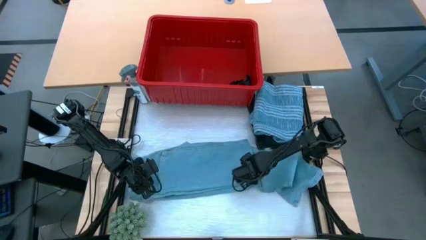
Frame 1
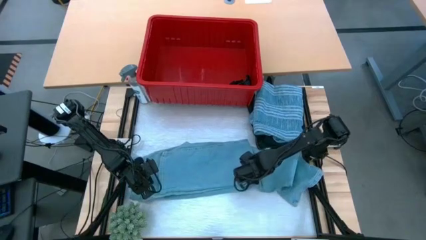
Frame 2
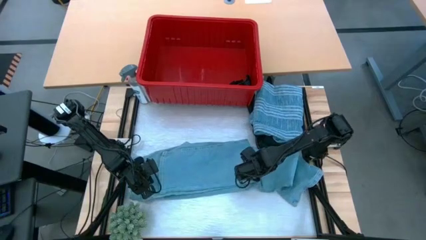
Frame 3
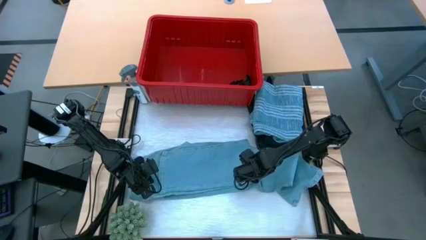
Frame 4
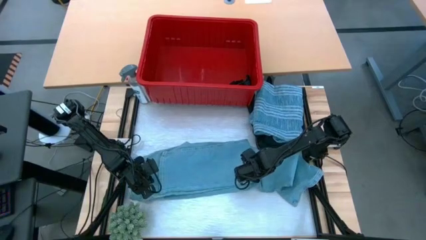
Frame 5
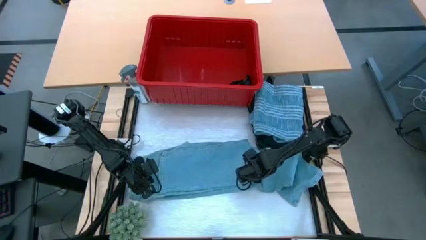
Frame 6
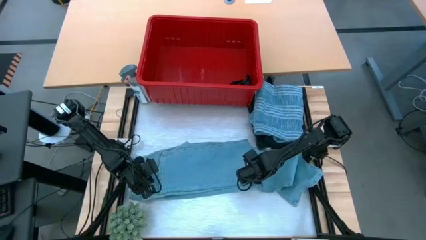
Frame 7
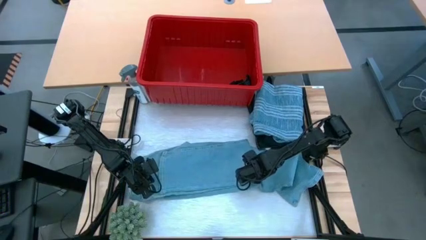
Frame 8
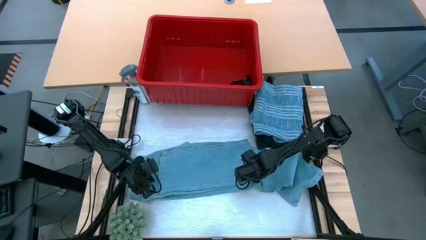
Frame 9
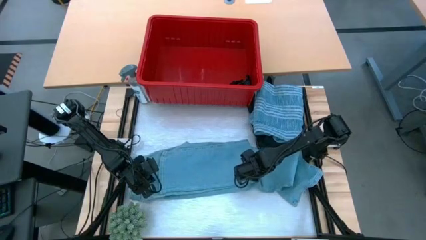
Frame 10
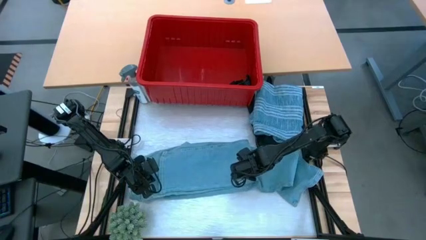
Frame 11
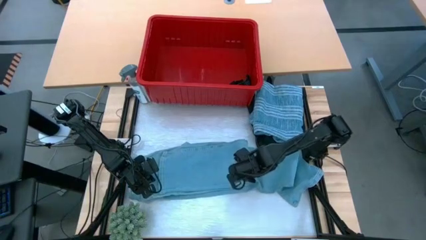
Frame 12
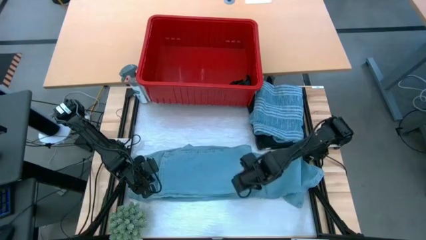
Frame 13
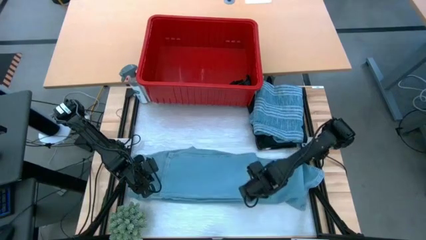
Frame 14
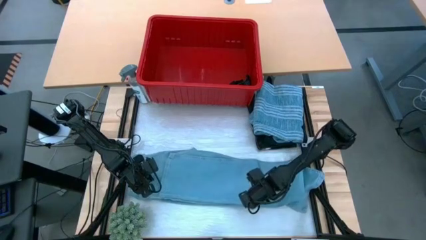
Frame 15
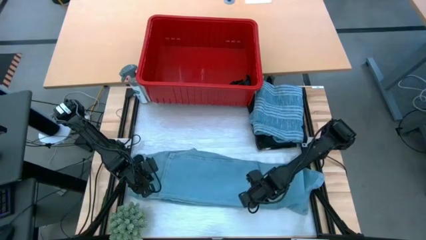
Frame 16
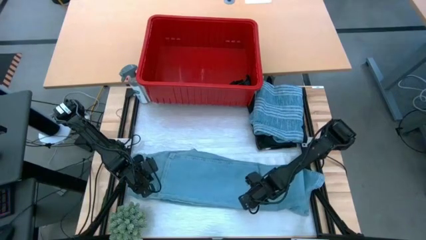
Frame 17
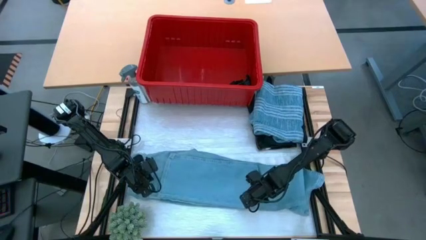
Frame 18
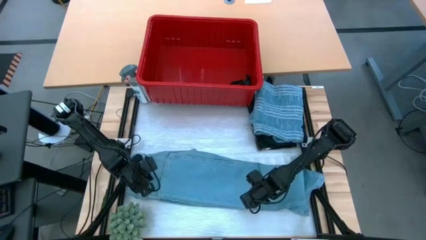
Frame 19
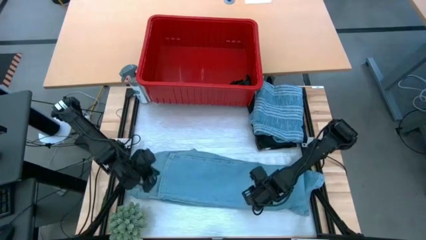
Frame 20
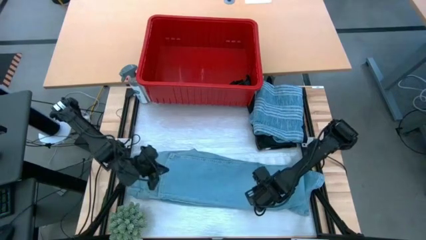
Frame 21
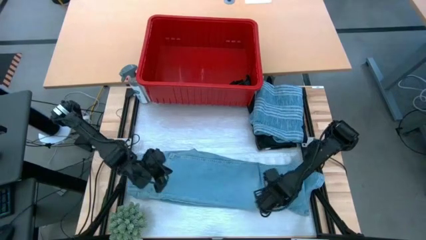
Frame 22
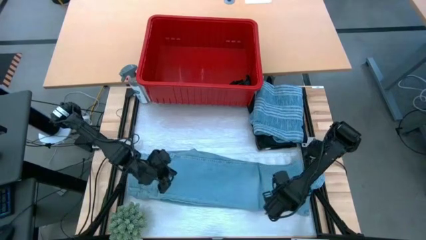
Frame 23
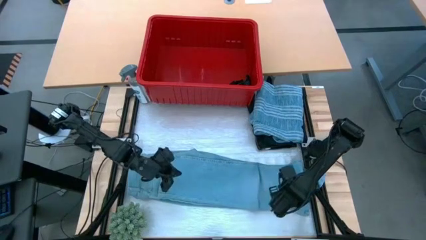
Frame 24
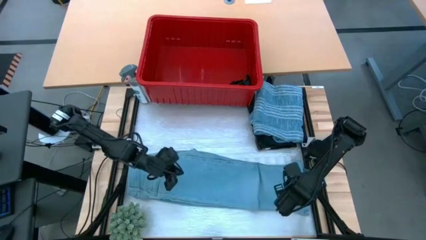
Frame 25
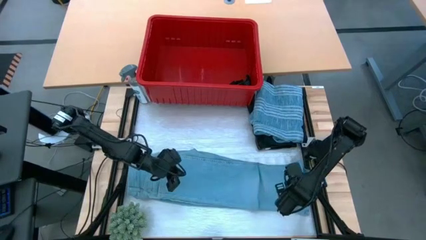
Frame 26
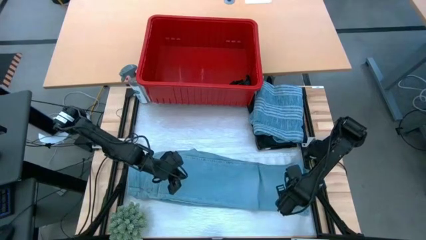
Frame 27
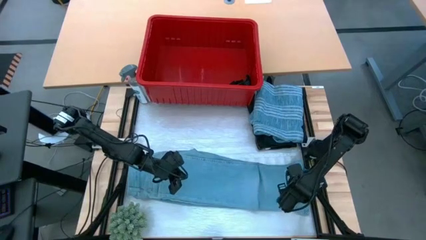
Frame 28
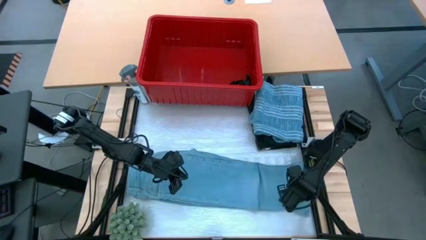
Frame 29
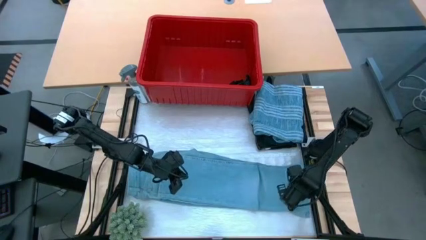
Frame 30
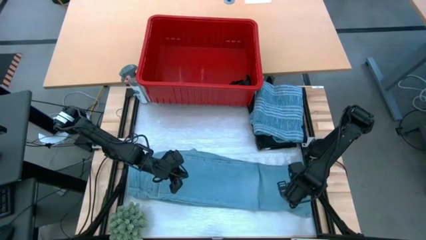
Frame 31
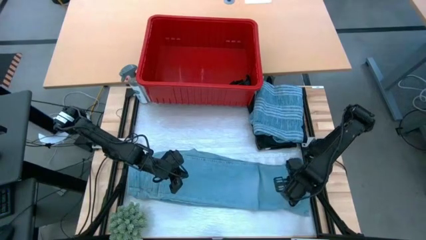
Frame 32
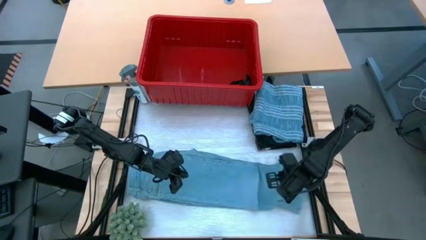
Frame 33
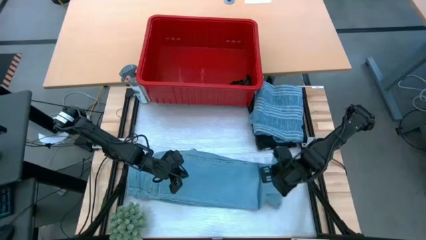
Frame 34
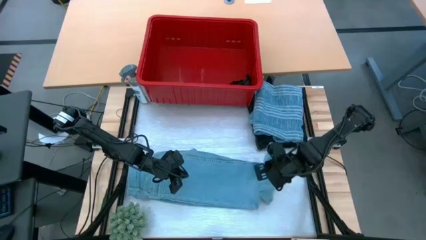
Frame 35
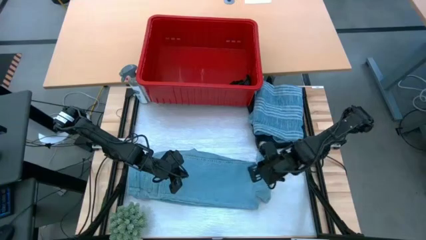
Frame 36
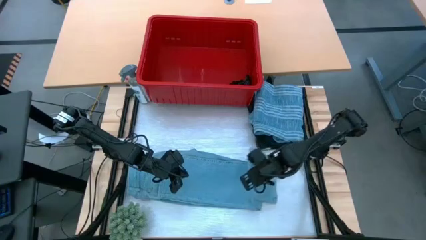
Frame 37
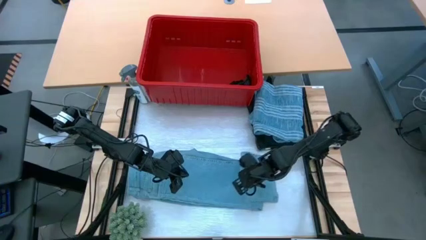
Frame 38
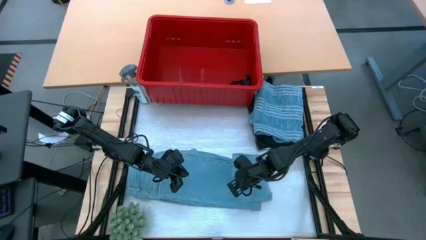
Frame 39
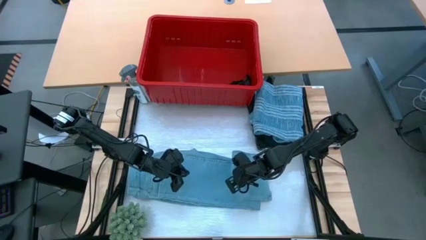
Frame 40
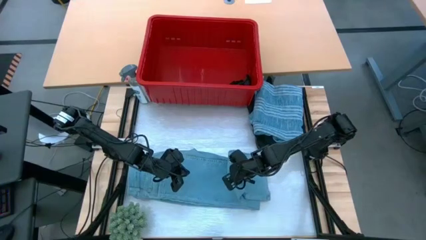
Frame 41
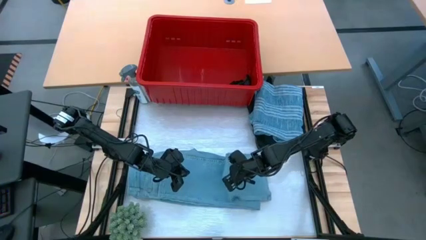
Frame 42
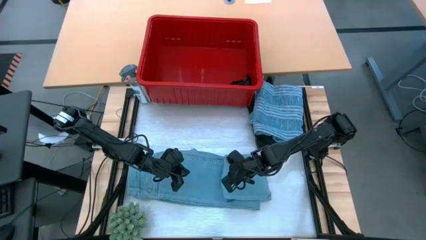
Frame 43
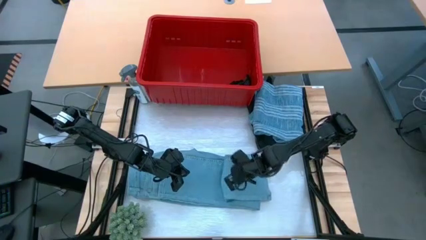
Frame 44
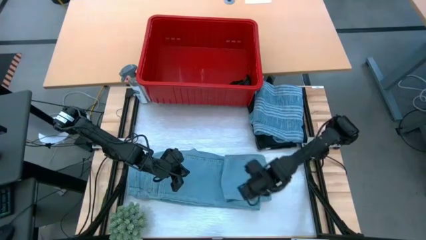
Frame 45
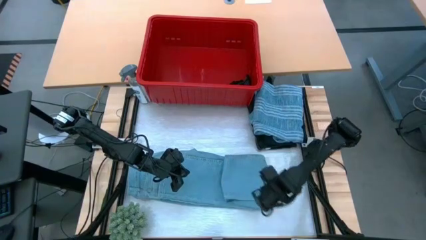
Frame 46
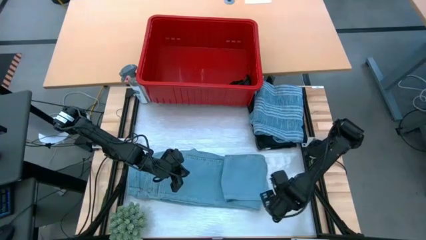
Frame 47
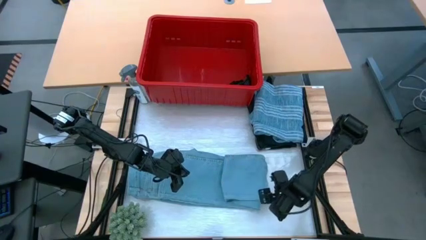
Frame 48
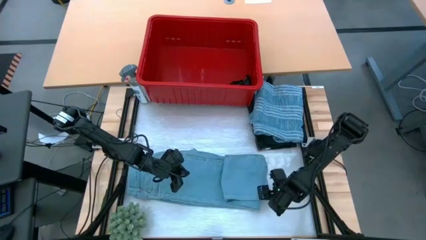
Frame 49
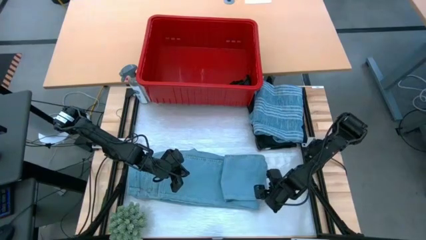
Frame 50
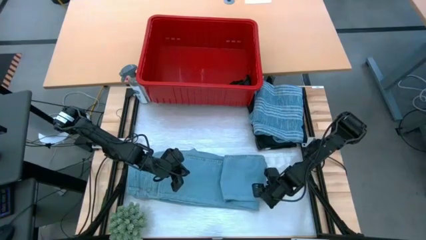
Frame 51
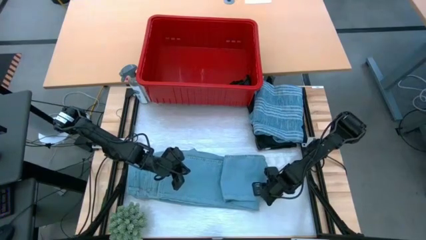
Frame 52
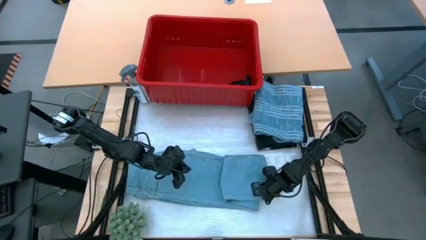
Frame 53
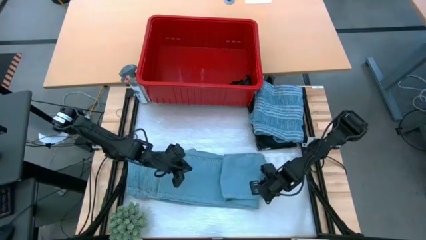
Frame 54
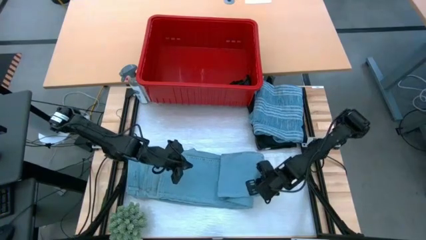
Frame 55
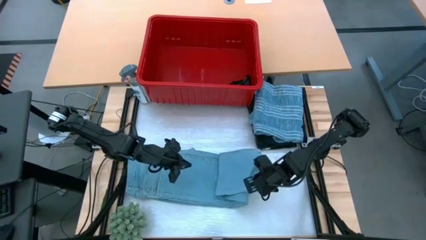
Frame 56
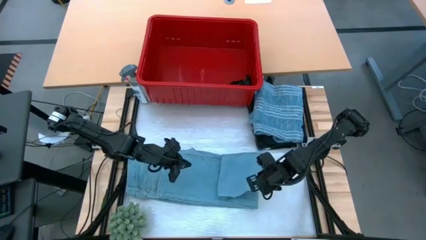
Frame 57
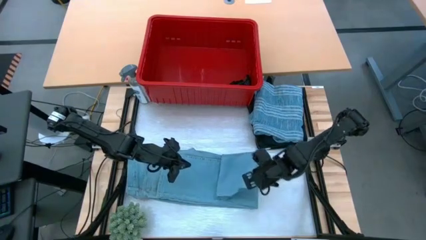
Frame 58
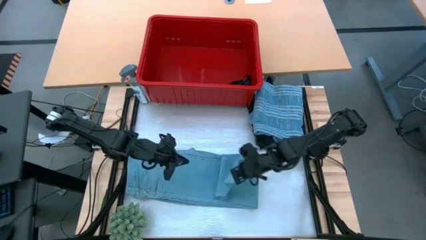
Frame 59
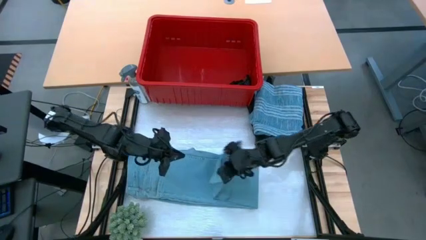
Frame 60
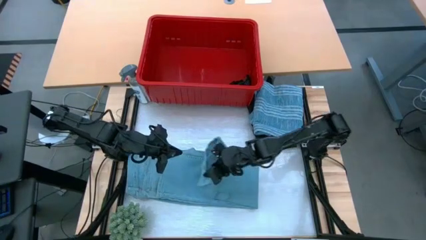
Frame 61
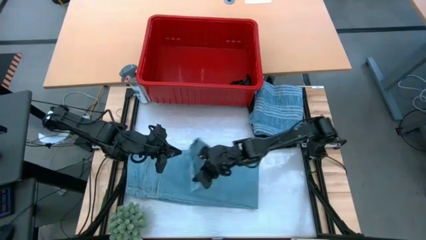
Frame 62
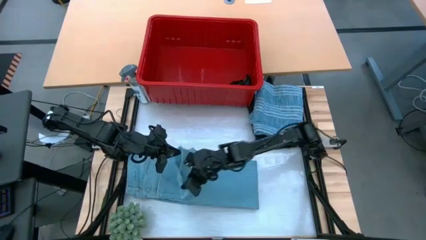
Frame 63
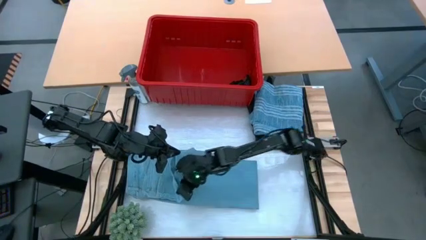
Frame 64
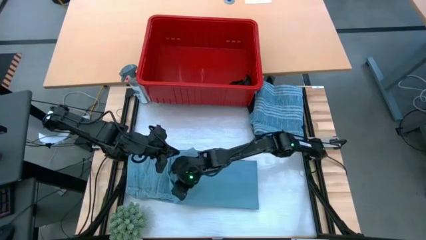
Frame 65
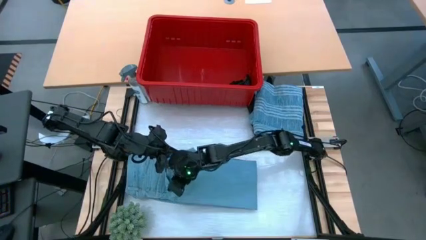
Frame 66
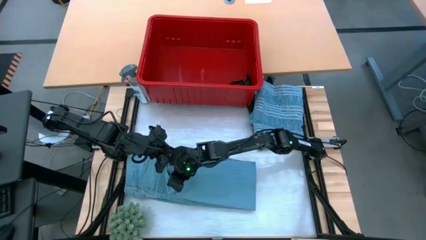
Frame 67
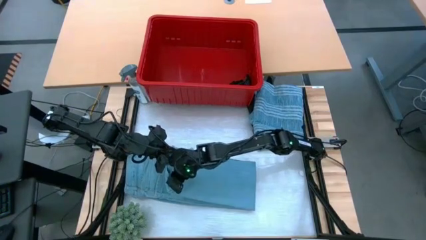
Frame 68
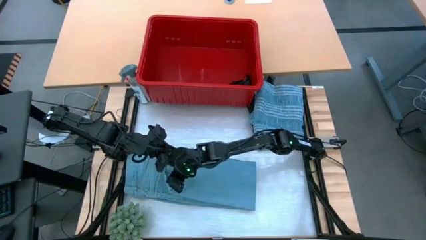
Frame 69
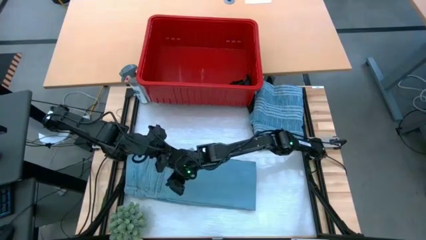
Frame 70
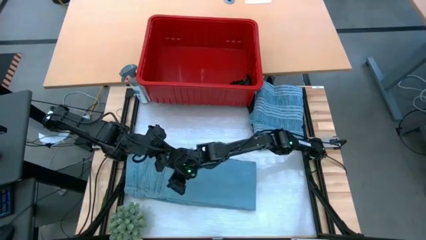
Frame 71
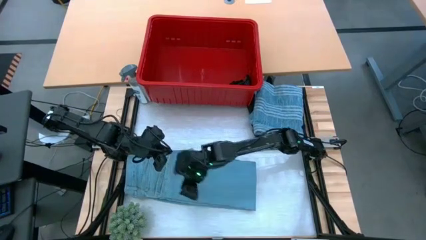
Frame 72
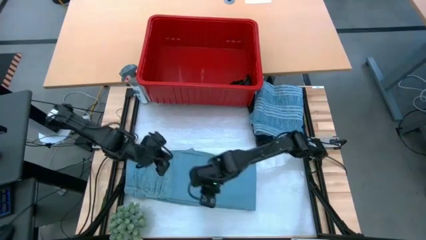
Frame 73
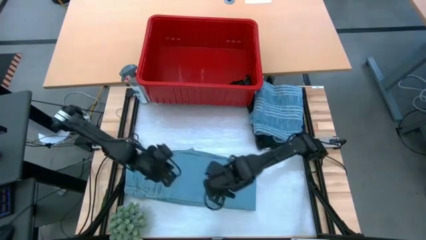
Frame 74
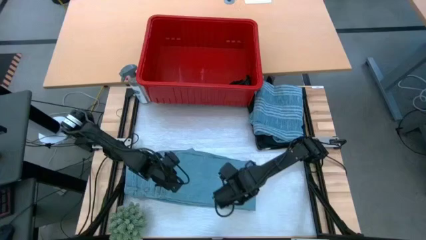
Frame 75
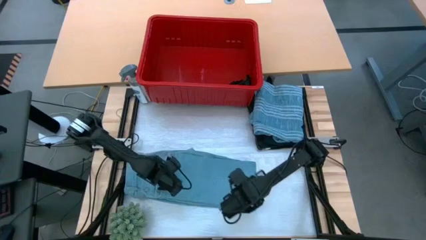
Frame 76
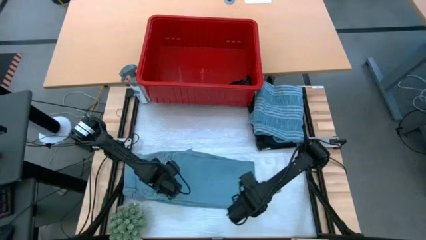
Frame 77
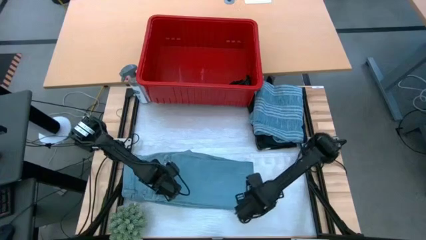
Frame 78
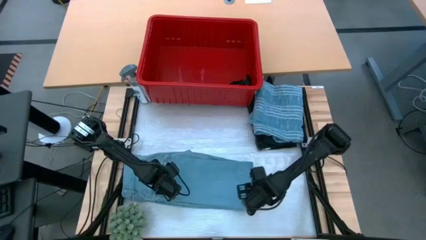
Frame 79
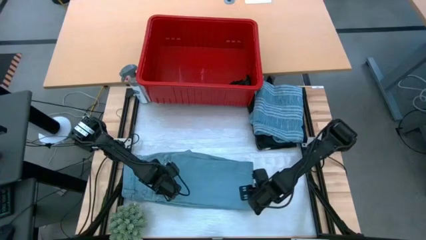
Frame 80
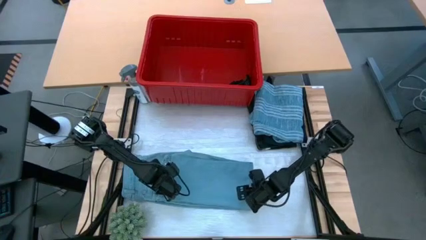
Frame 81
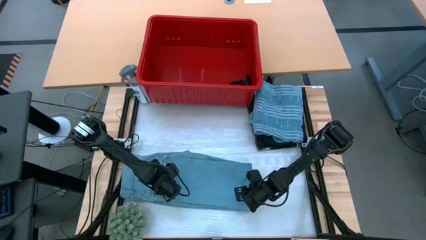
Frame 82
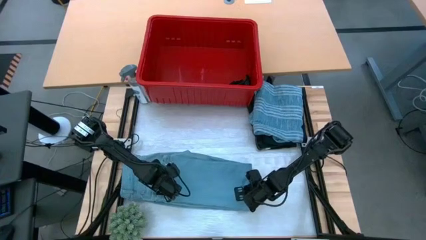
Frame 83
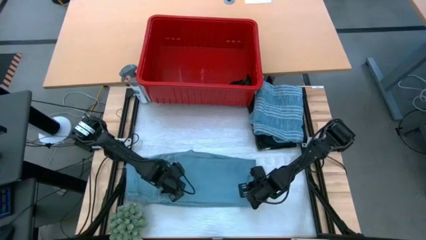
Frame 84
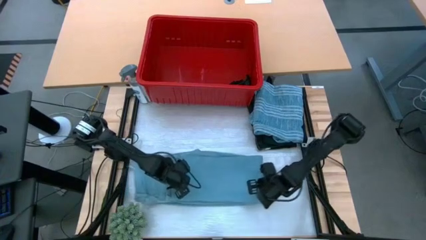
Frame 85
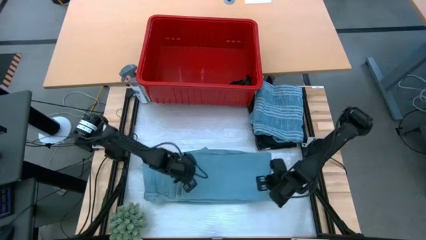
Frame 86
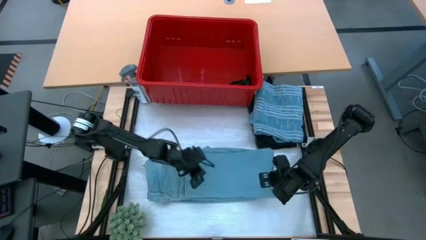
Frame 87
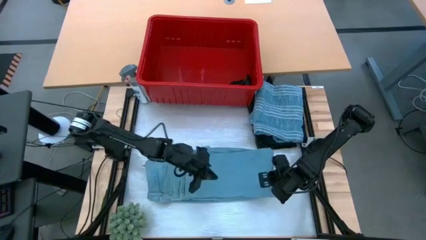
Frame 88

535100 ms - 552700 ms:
Task: Fold Laundry from Bin
Fold the light blue pants
